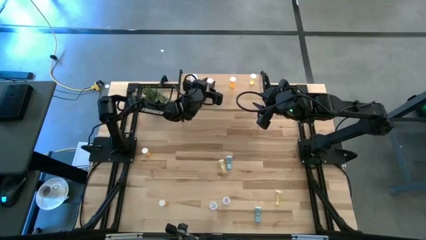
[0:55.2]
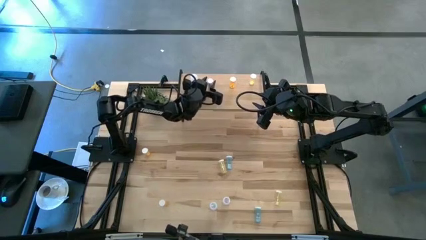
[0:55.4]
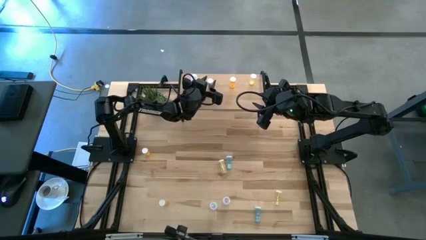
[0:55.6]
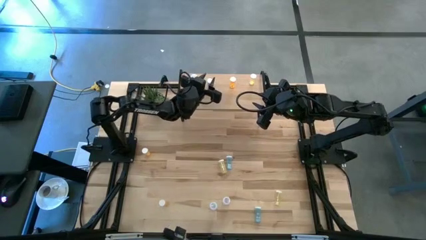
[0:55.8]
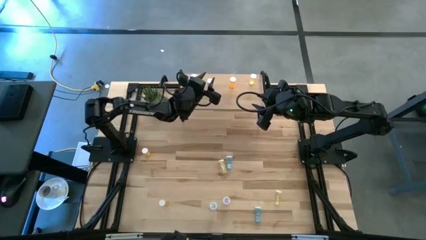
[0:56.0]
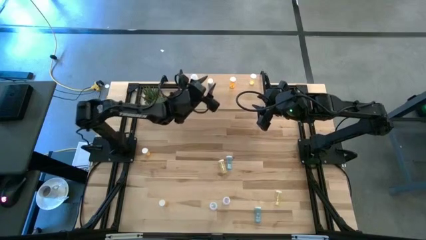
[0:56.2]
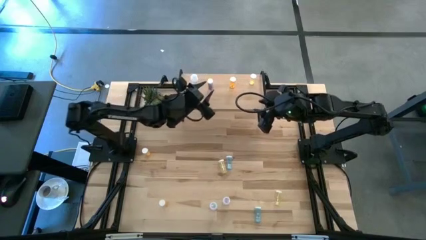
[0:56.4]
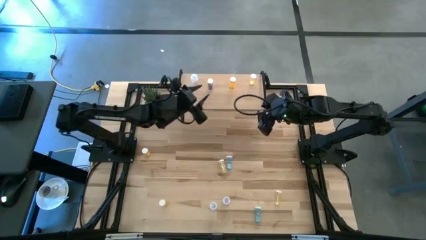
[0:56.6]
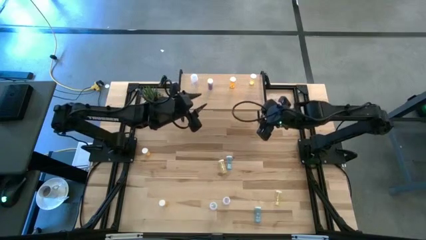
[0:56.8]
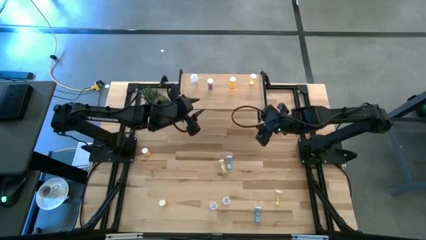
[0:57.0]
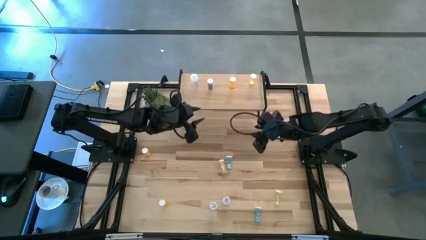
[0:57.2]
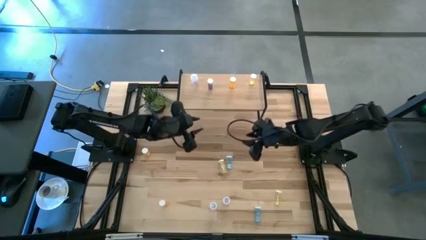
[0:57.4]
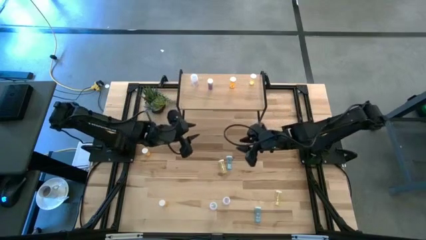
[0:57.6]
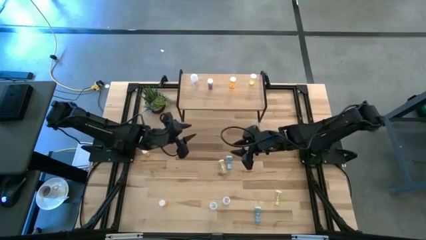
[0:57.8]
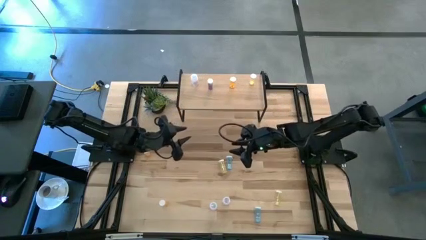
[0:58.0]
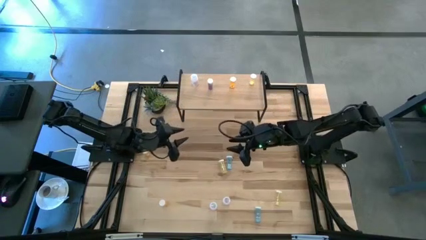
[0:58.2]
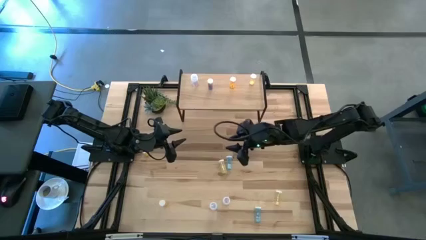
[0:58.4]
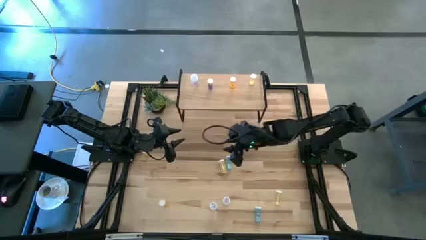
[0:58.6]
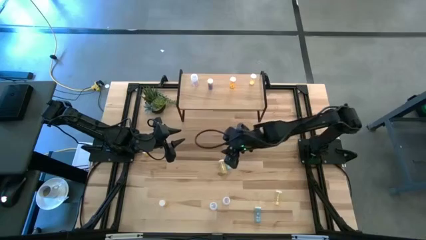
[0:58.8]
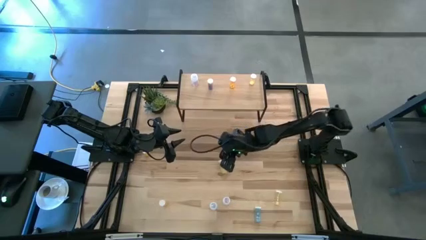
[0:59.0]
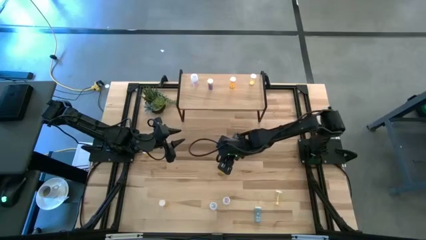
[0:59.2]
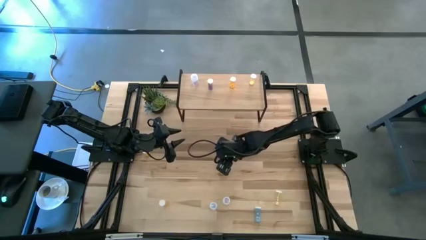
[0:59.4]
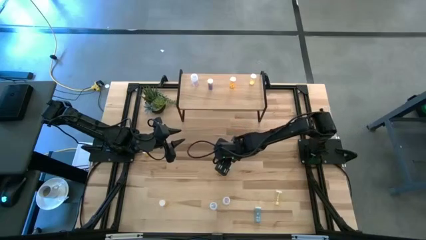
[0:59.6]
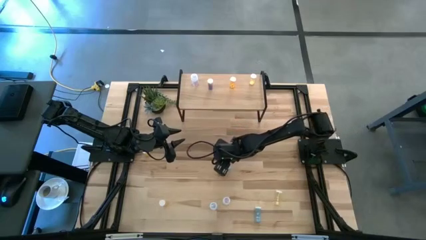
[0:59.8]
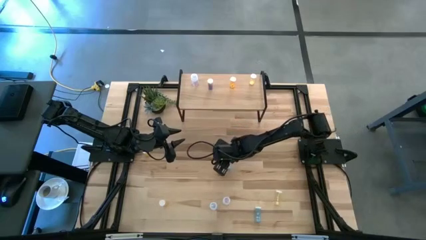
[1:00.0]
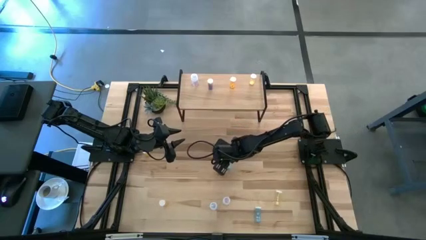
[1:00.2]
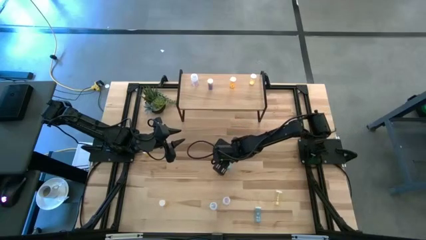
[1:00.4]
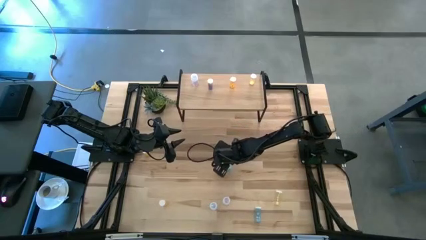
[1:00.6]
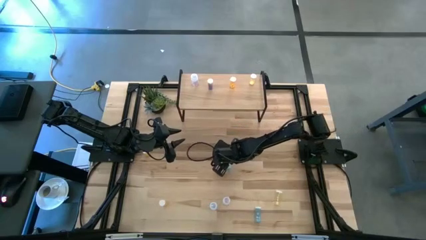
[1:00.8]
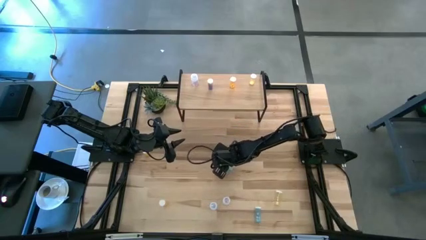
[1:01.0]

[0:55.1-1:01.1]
Task: Pick and place medicine bottles onto shelf by color
Put the top yellow pill bottle on the shelf aligned with the yellow pill bottle

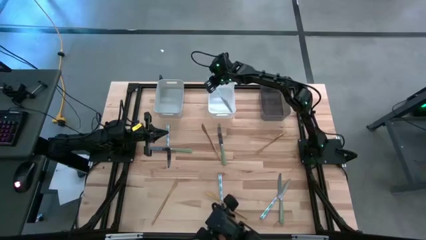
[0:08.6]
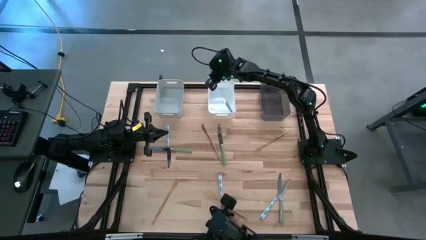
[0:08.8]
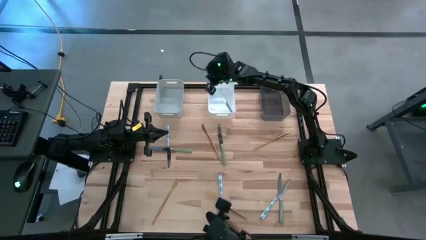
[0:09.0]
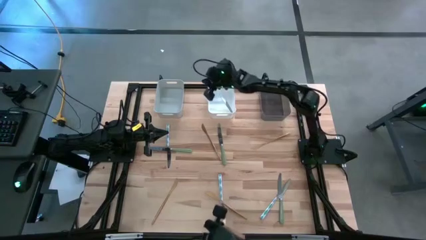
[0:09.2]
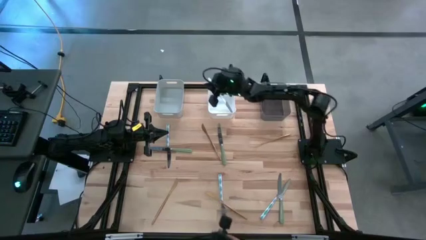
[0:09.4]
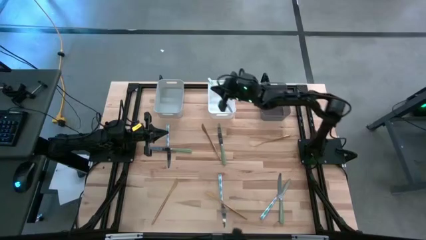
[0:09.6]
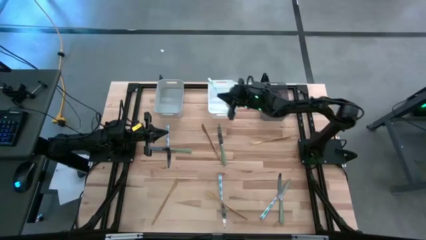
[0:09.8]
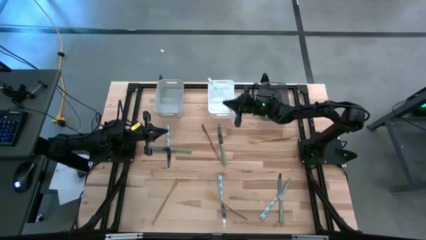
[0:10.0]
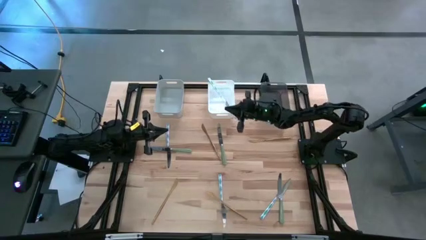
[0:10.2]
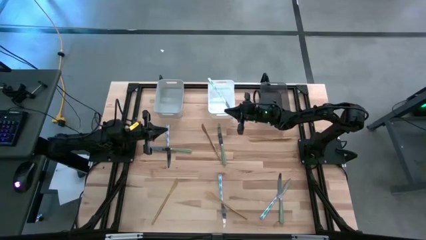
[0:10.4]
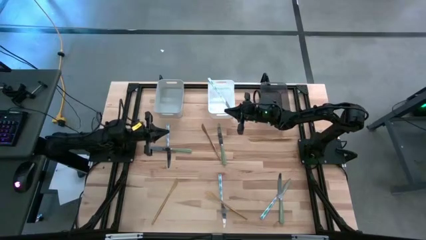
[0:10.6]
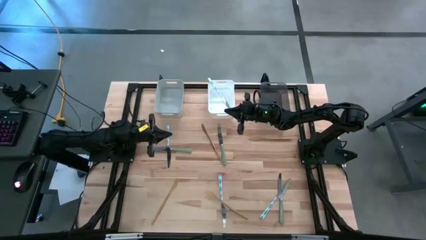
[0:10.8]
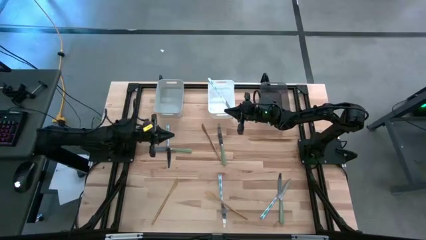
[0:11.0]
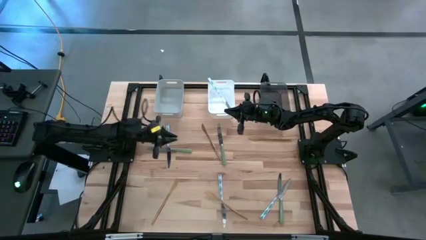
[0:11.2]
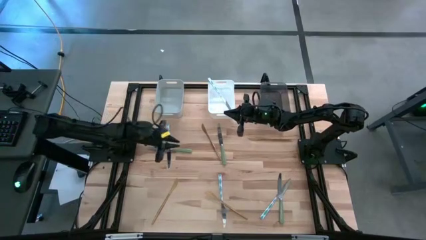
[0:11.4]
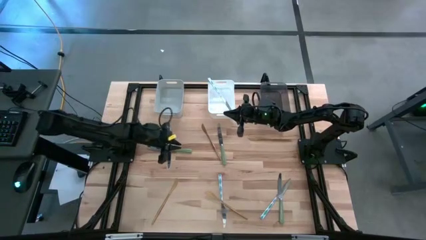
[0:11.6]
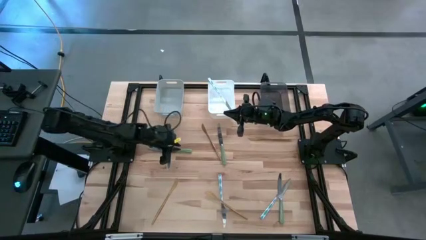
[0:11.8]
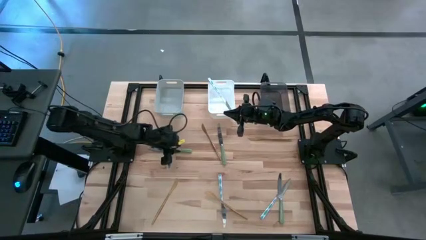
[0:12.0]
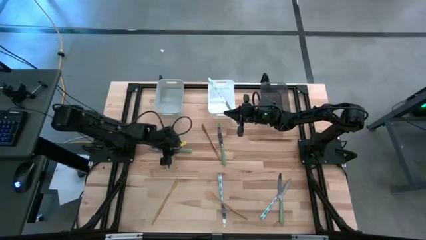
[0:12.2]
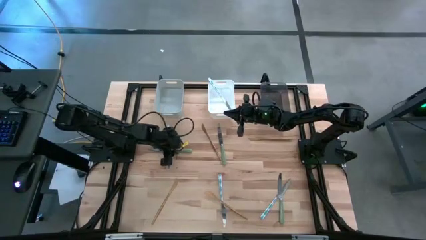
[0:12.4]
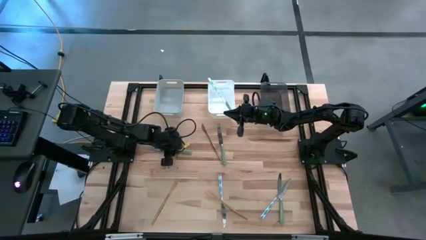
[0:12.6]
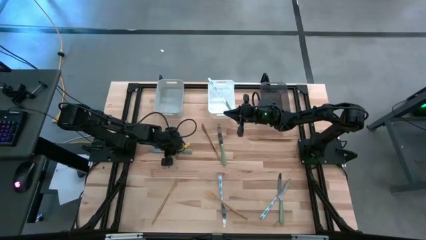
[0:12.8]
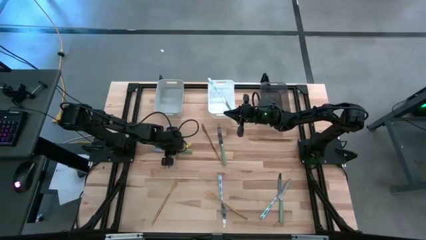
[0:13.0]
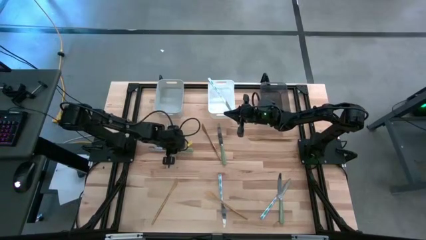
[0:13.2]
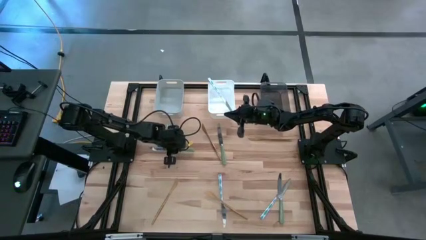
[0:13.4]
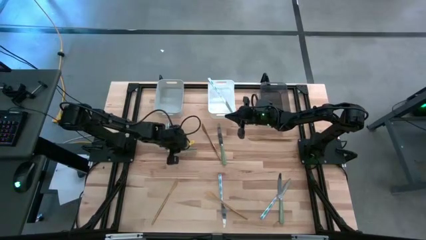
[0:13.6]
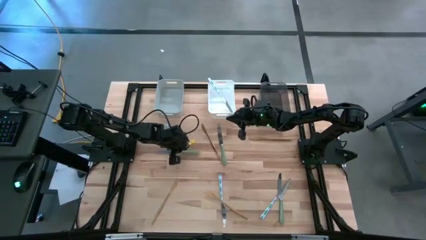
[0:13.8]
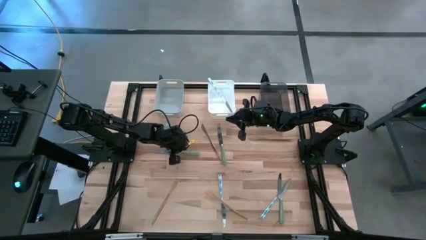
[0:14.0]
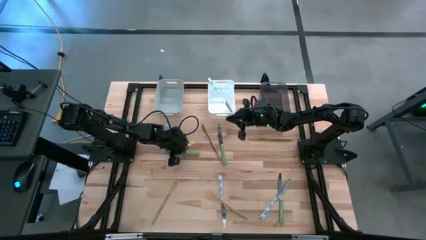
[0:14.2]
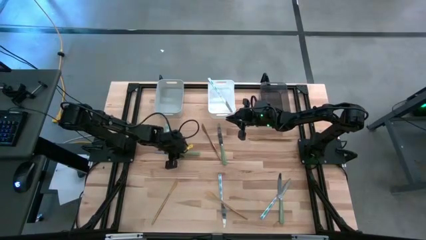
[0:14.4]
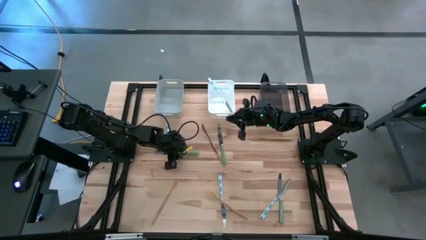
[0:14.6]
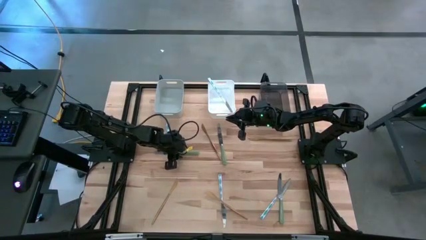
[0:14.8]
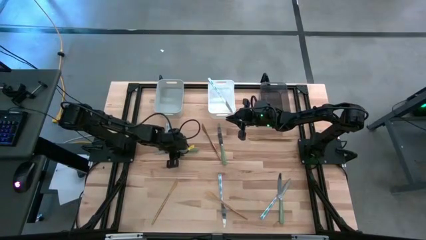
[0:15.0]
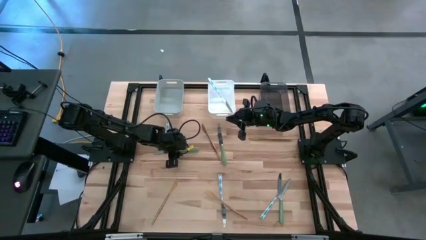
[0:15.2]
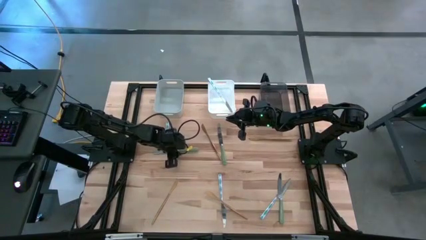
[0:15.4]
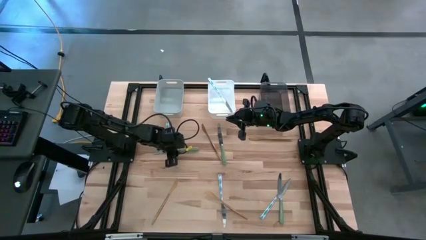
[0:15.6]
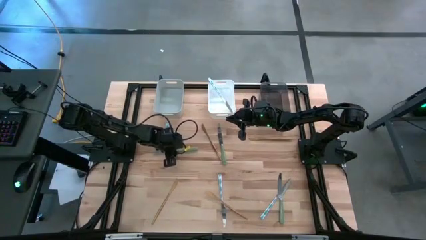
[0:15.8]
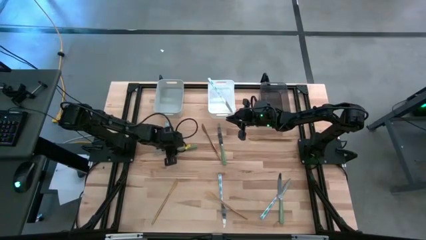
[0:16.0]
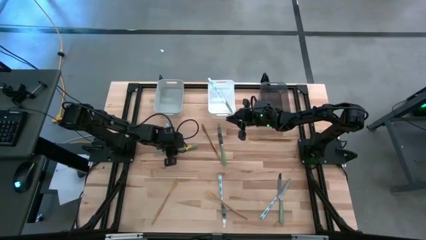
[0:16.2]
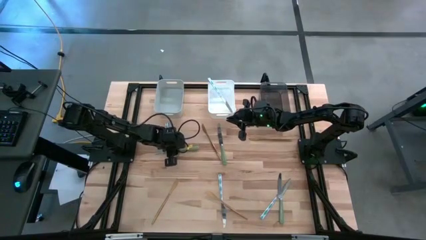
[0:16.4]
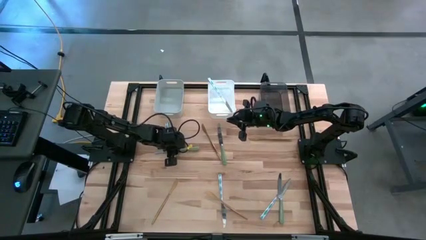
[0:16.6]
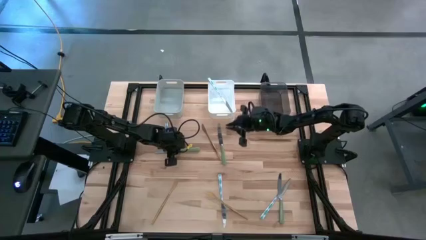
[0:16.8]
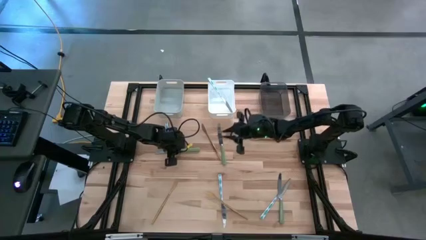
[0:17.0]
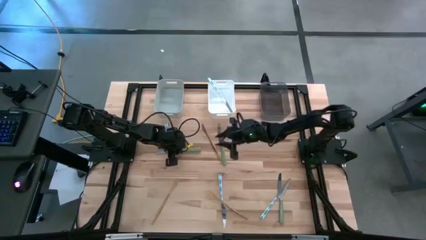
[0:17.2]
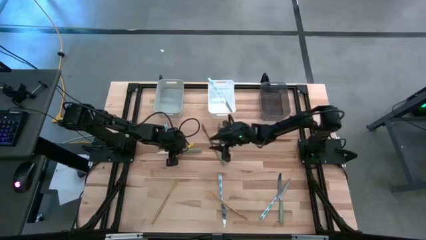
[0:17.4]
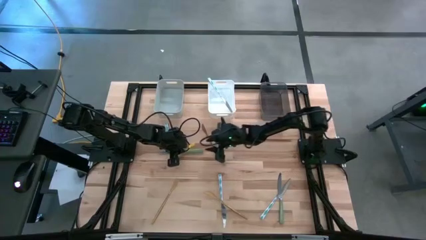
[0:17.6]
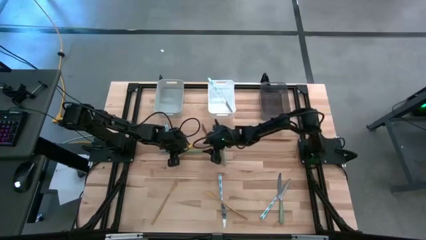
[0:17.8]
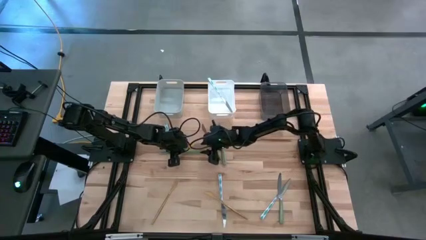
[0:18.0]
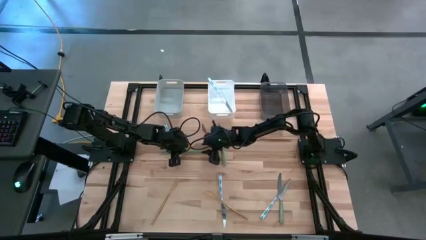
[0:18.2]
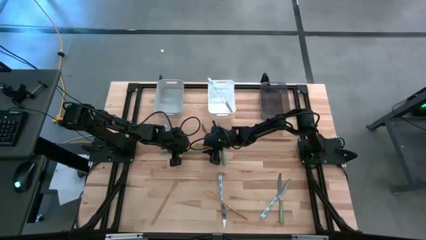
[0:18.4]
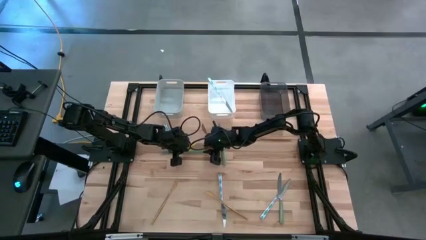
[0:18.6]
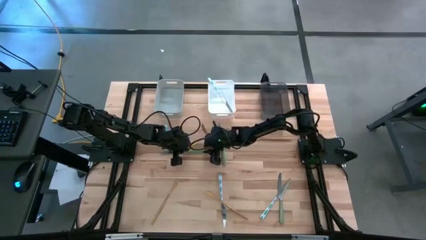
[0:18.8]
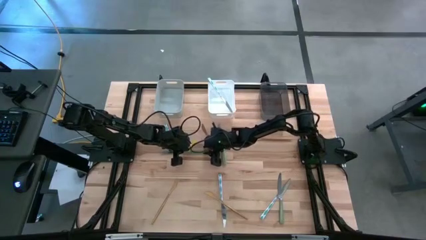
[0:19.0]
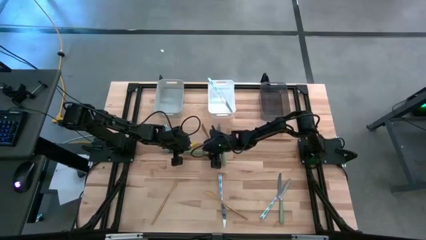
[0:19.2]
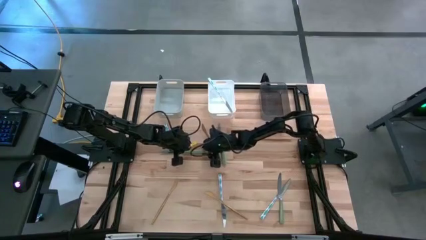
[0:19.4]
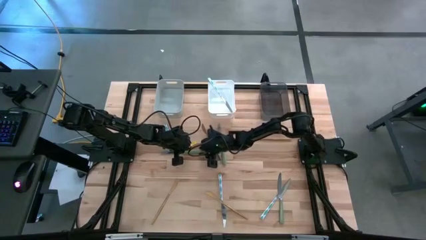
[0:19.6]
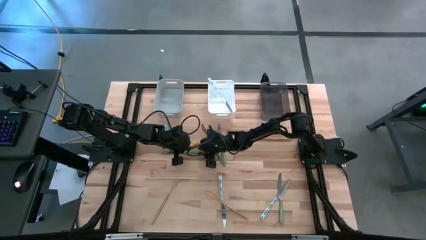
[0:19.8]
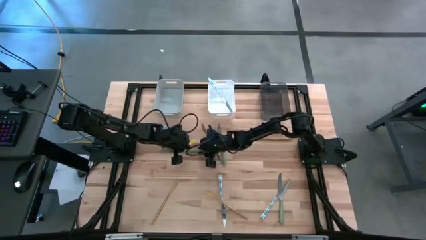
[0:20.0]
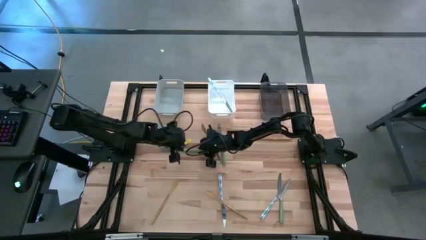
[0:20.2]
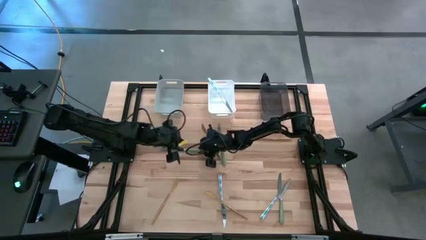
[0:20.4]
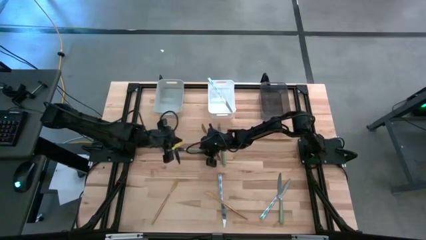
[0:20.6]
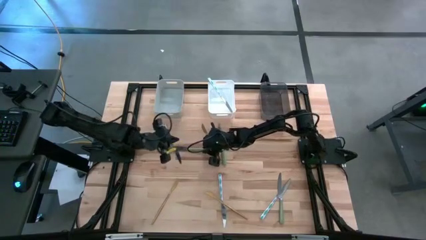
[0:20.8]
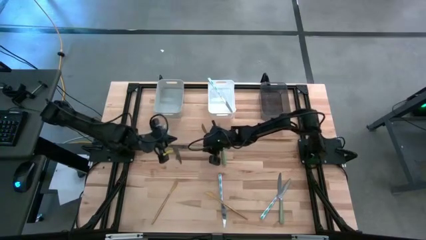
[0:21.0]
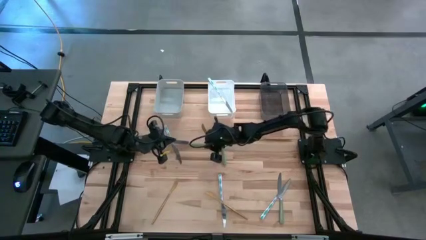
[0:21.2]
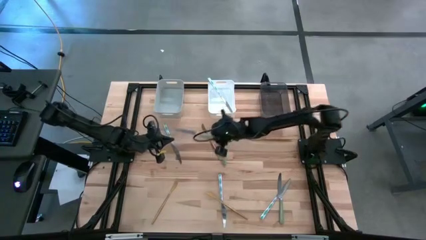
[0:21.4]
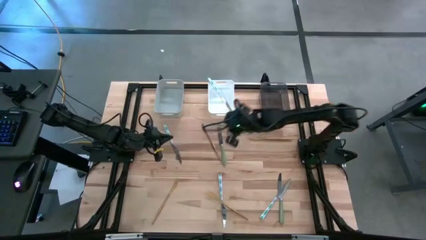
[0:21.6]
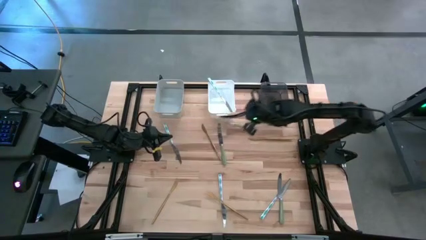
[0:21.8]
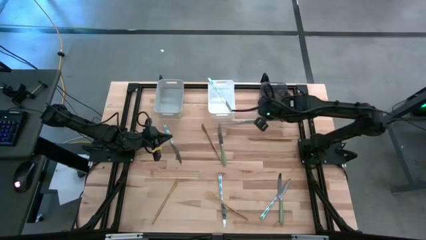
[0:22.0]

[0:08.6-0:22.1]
Task: Sort silverware by color (type)
Put the top left green table knife into the black bin
